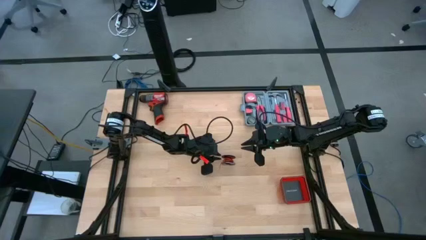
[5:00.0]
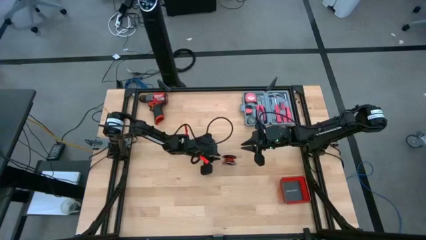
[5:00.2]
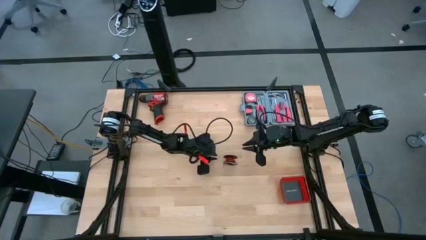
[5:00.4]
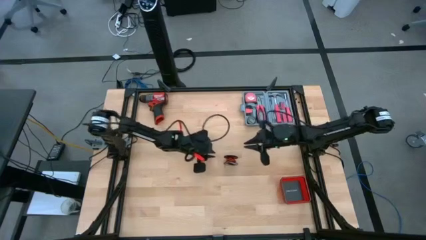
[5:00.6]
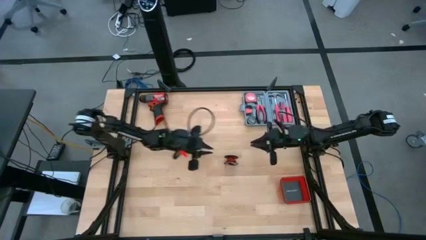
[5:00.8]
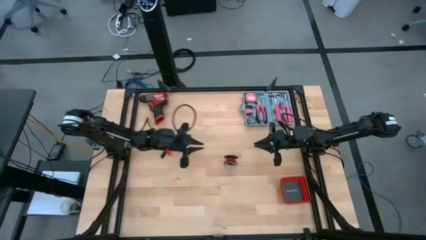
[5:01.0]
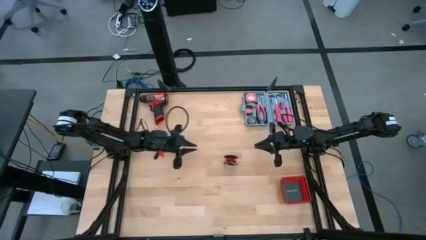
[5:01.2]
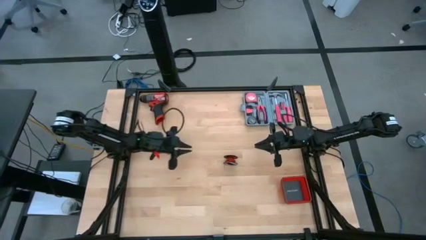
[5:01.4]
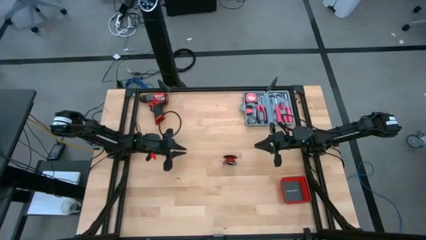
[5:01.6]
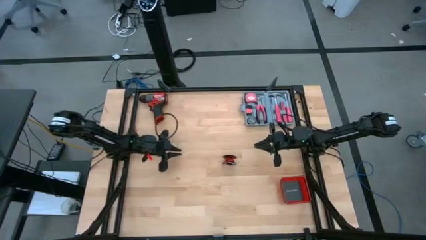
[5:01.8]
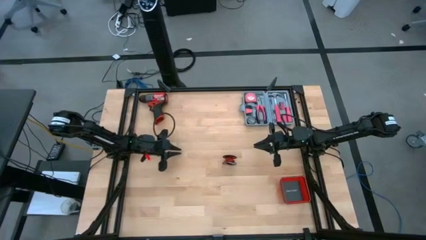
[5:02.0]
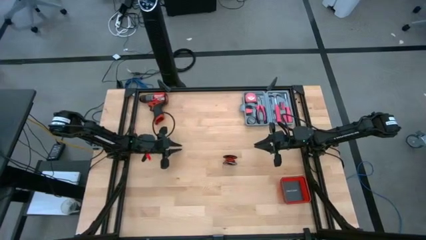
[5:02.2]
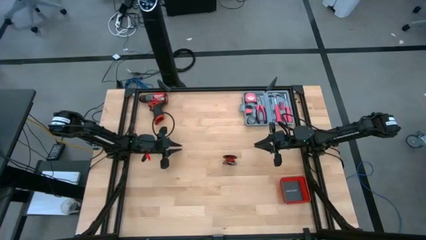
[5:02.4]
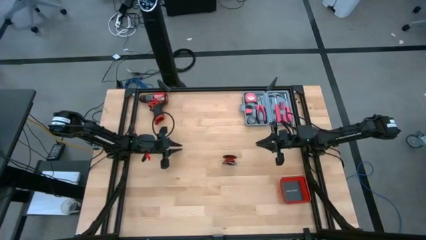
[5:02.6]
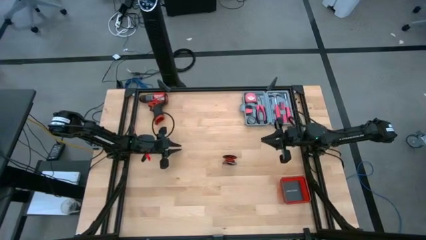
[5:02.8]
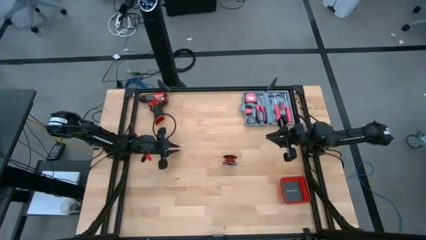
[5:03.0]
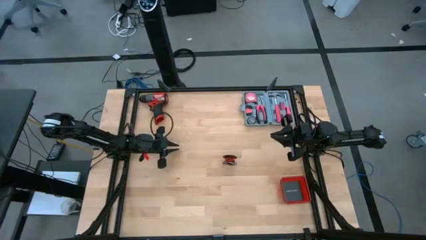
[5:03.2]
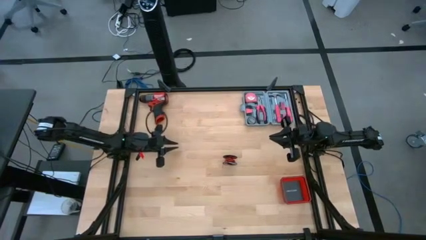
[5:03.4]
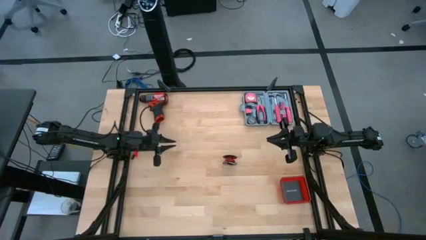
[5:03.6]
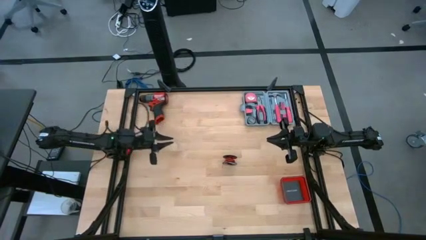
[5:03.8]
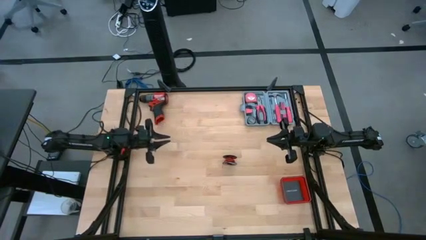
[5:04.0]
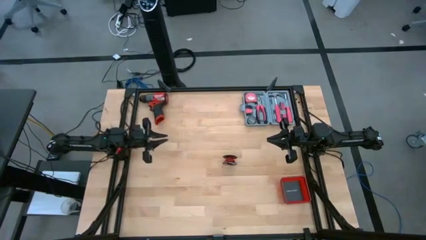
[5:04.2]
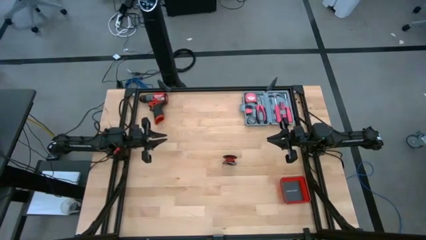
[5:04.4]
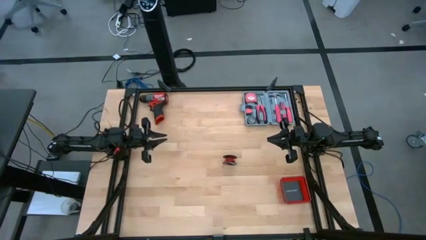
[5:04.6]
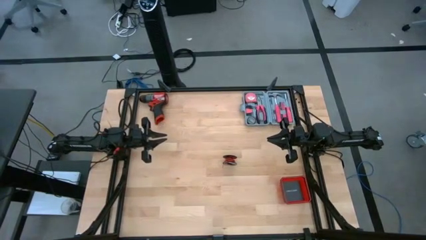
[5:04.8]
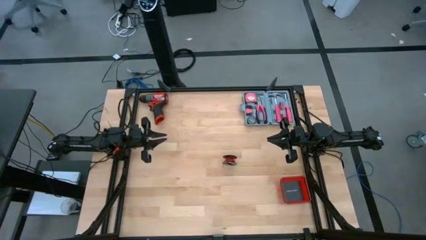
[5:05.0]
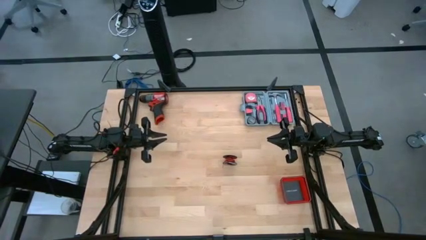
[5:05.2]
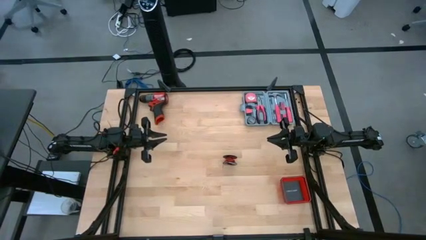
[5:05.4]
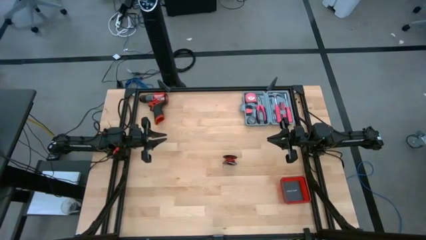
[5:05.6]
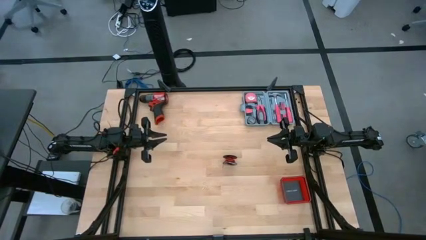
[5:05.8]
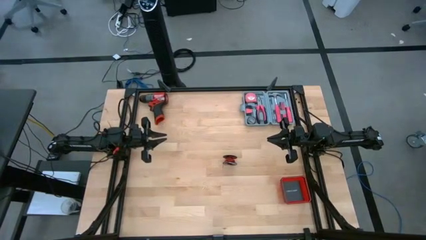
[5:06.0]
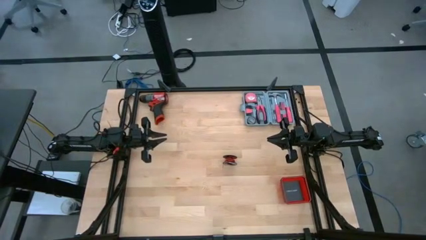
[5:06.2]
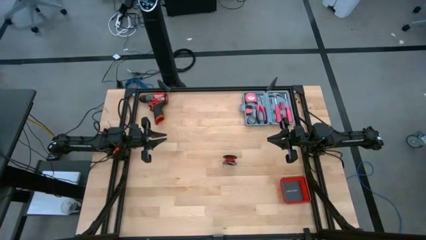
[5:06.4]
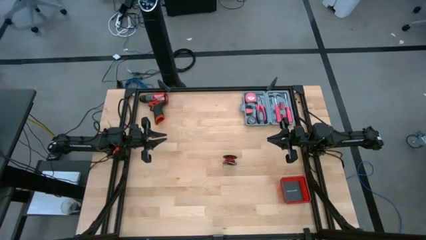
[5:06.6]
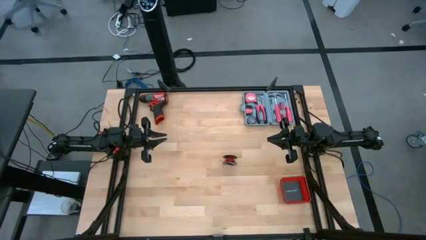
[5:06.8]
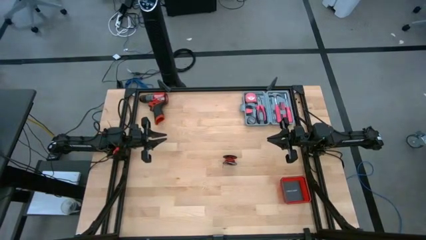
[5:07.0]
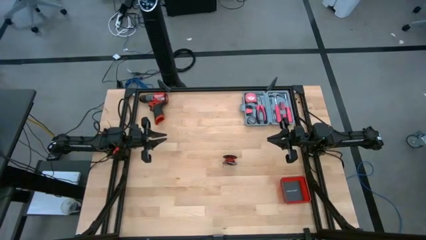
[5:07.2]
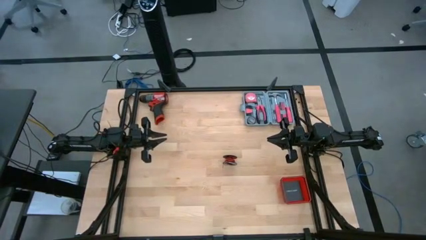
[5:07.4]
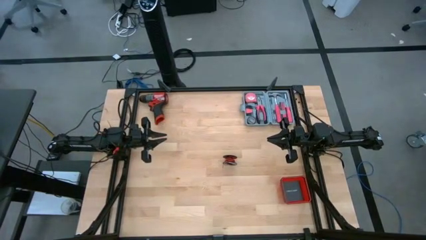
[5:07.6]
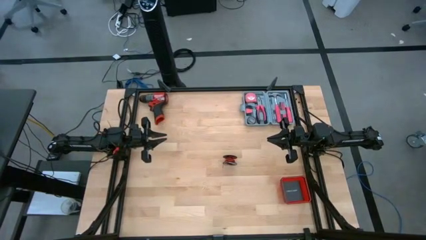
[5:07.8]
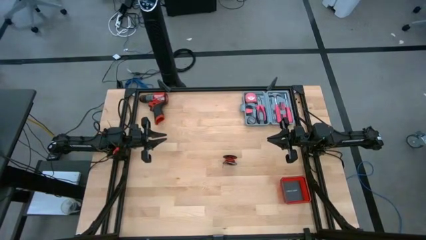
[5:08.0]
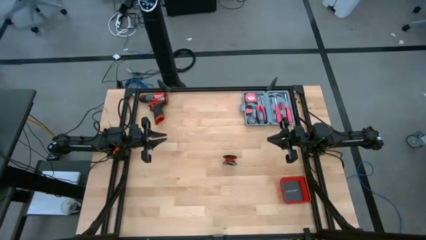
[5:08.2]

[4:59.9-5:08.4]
Task: Coil cords
Return to Home Position

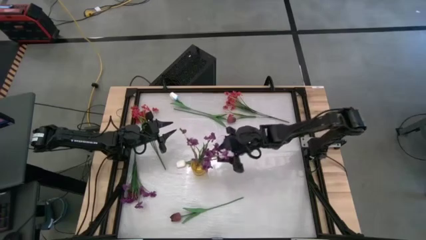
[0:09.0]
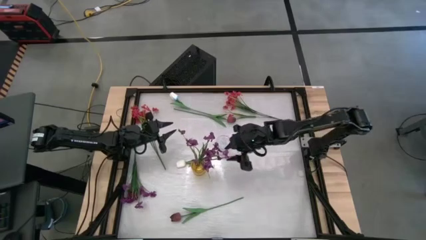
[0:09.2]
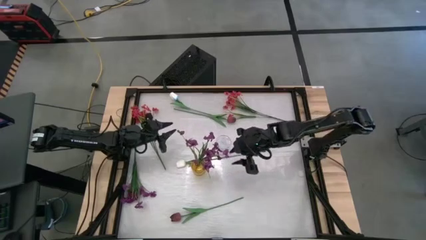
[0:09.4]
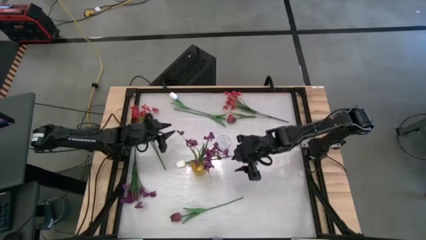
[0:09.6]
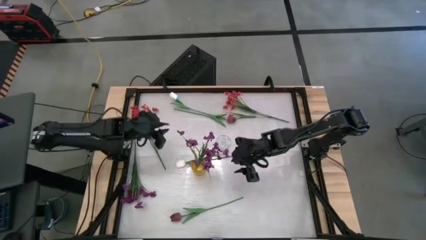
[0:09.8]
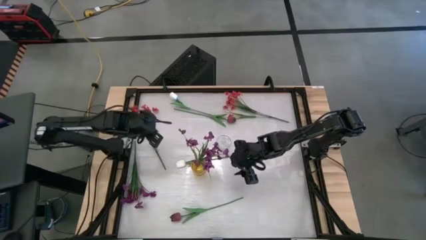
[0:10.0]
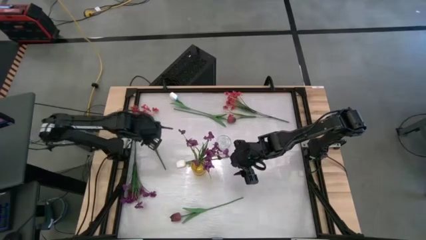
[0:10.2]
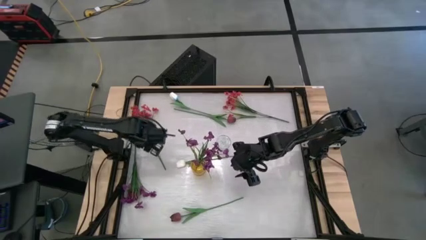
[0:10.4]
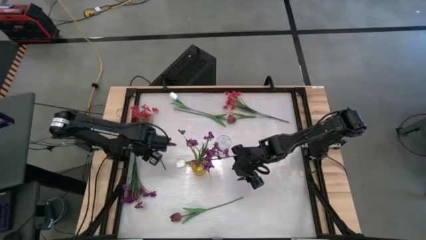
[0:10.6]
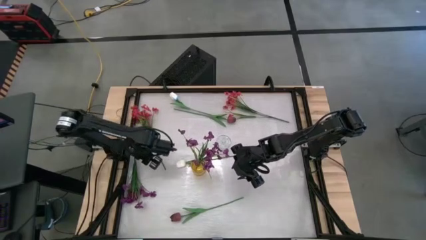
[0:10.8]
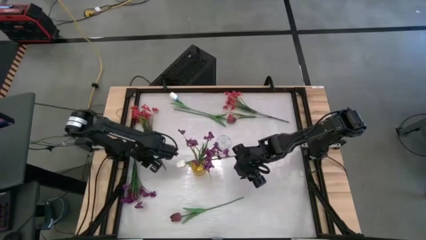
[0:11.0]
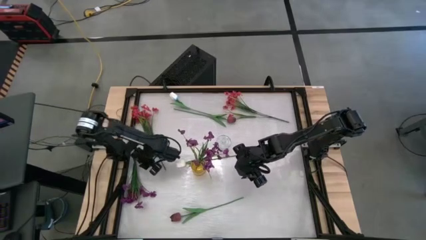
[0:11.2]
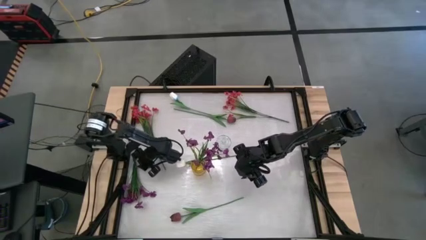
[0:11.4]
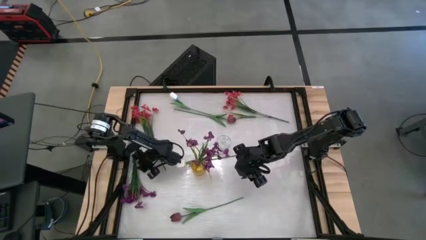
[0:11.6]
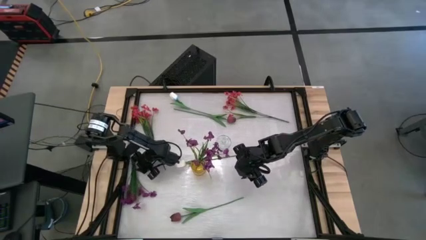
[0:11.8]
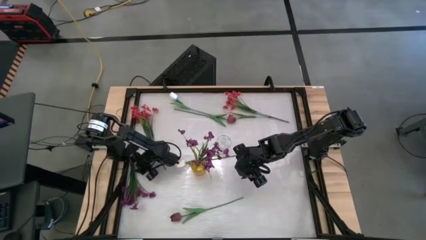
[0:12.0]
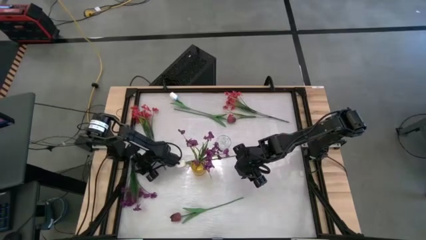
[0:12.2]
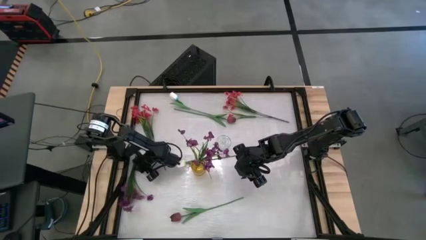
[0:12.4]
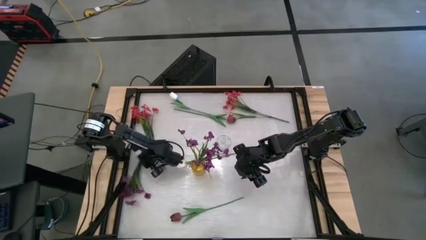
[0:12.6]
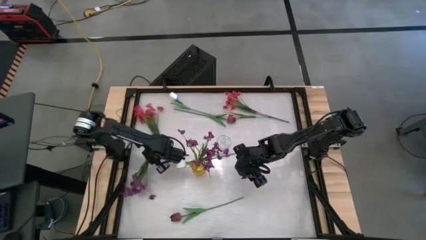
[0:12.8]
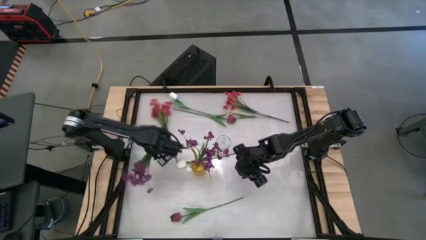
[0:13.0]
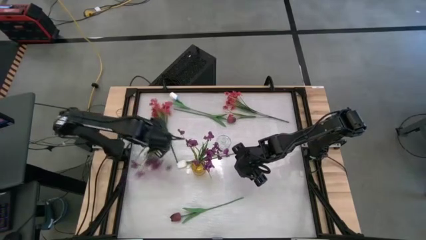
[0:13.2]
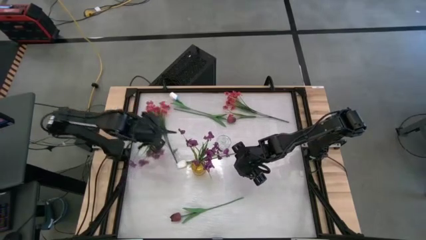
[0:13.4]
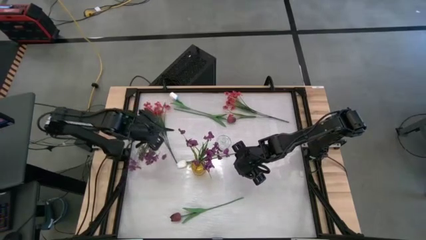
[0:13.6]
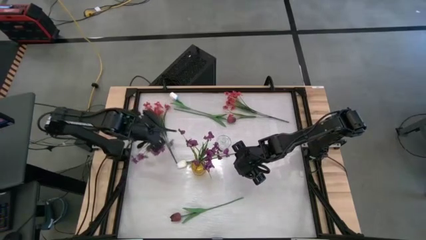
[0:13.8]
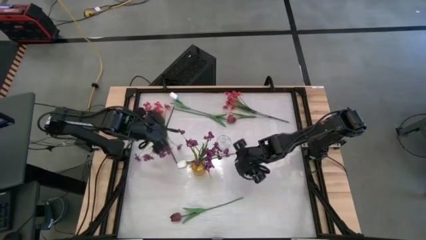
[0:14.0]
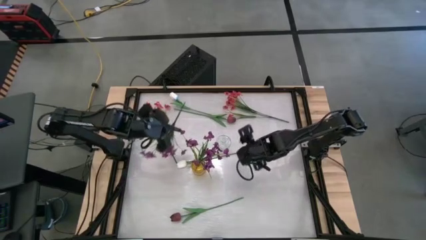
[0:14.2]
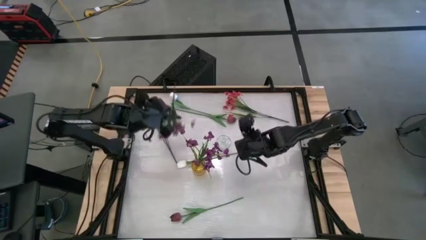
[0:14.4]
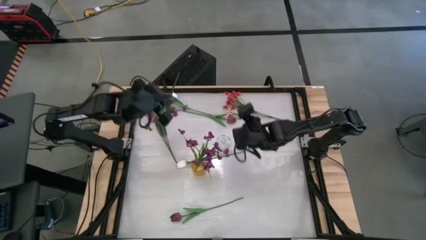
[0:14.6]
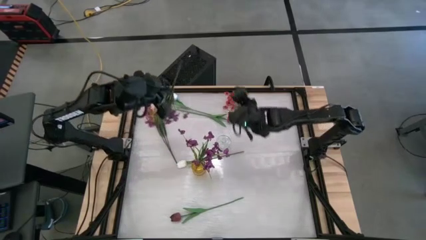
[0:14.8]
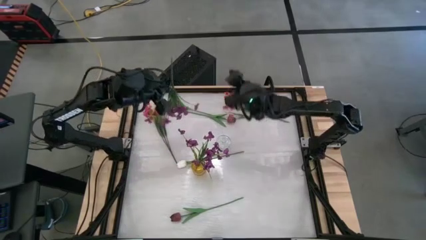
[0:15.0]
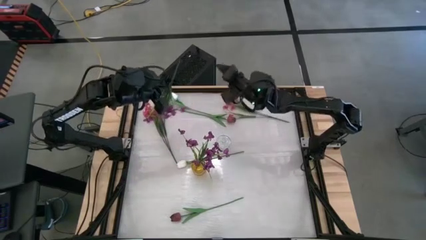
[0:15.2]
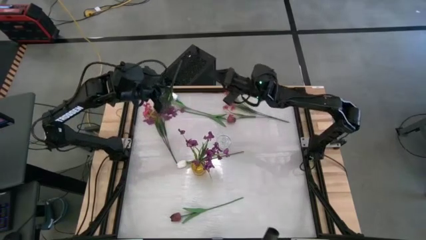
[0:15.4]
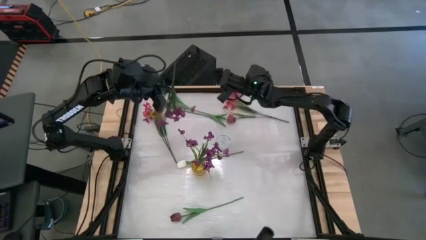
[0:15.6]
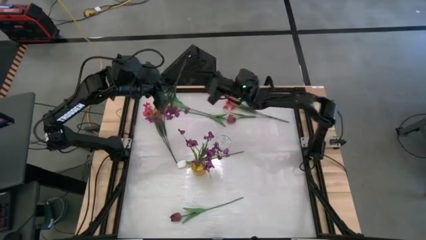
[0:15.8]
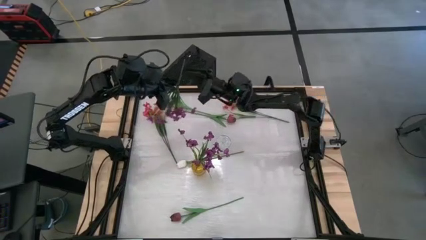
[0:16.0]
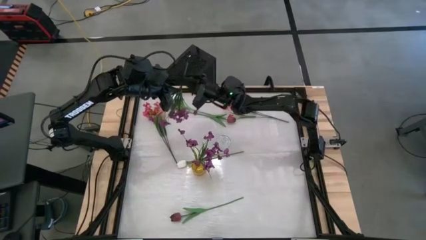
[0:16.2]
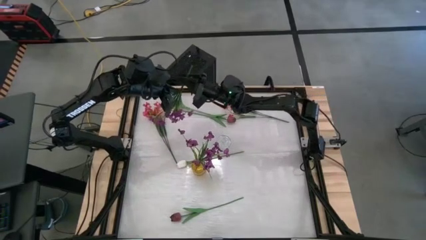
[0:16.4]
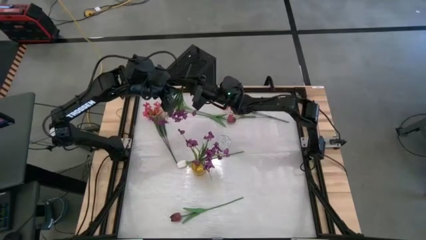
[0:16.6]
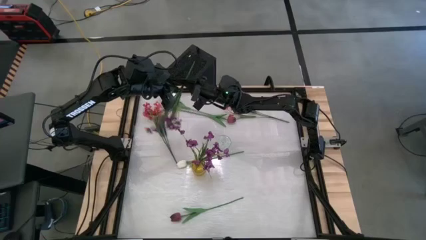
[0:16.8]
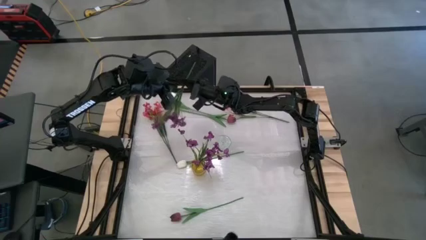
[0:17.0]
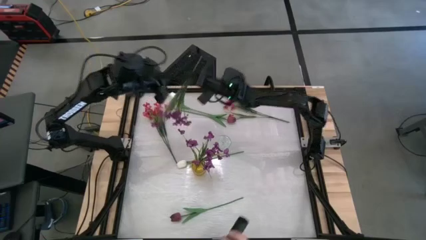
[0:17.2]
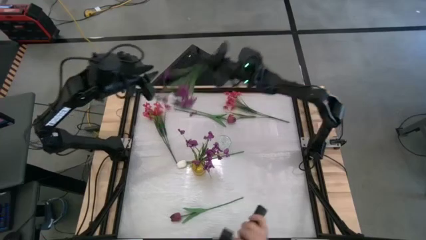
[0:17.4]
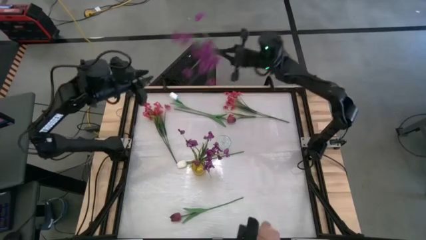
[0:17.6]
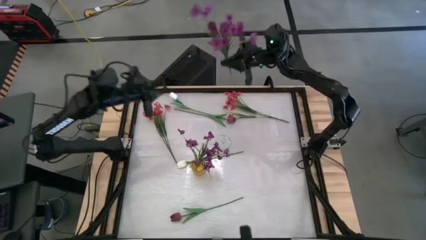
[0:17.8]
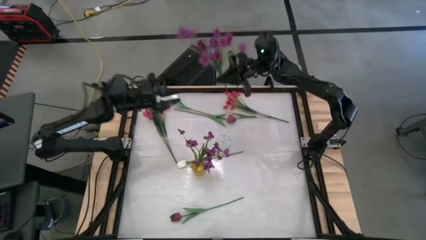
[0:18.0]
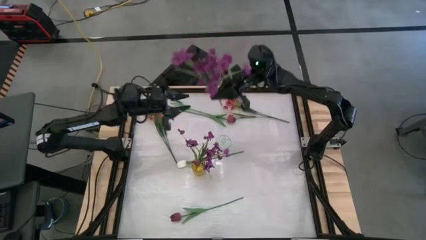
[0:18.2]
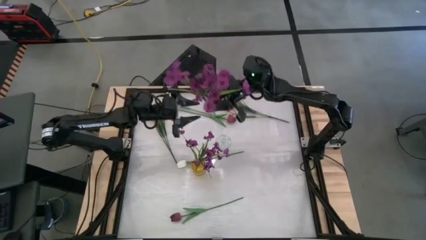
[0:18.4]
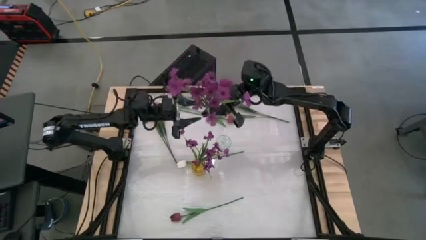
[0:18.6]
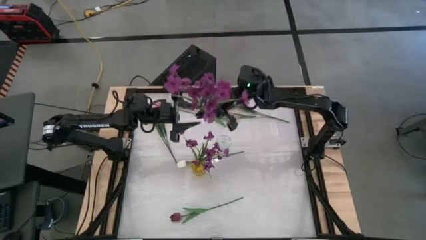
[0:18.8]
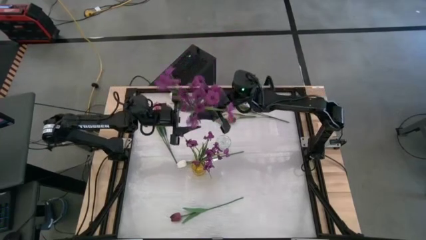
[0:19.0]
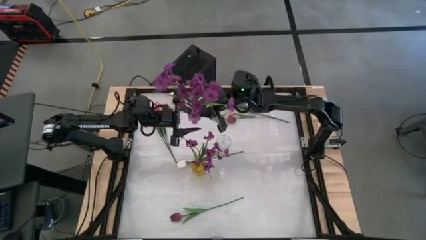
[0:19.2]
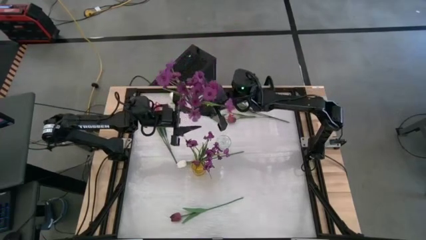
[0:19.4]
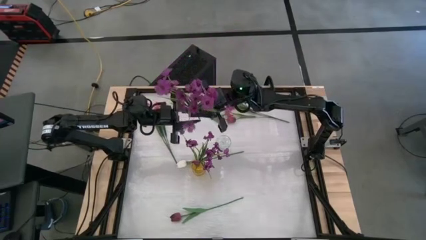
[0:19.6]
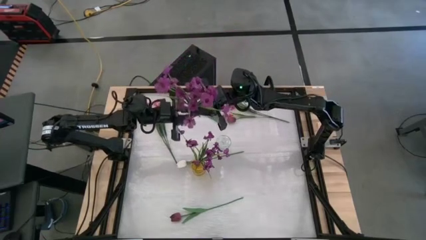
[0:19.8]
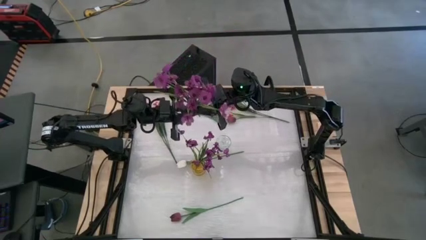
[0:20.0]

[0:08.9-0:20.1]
Task: Sort flowers into vase by color
Put the purple flowers into the yellow vase
